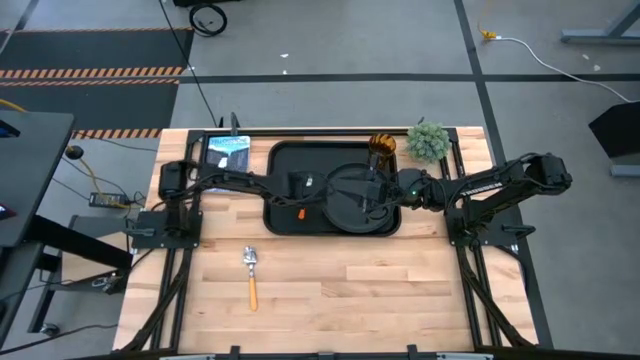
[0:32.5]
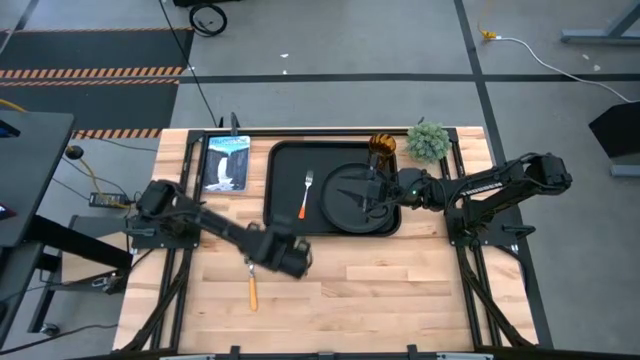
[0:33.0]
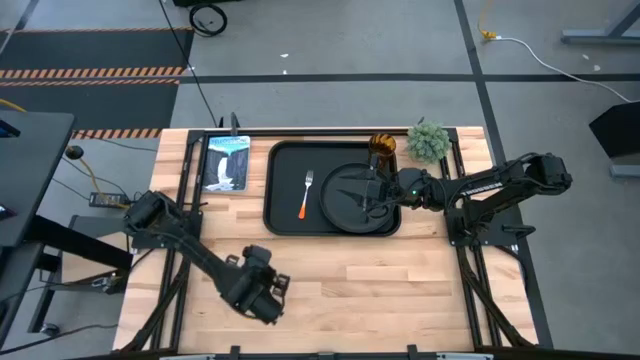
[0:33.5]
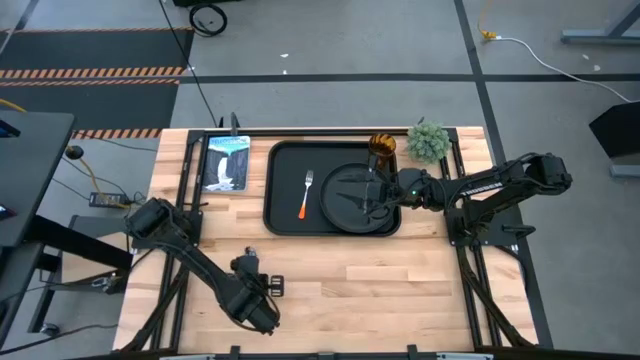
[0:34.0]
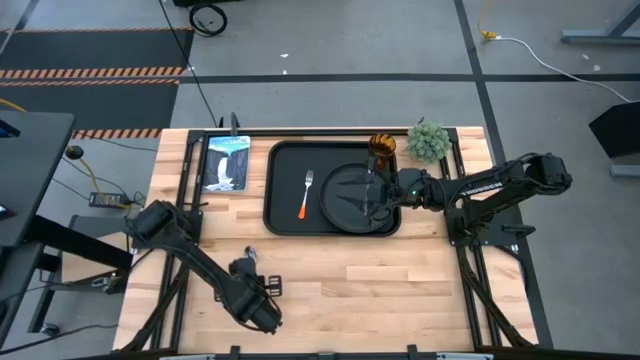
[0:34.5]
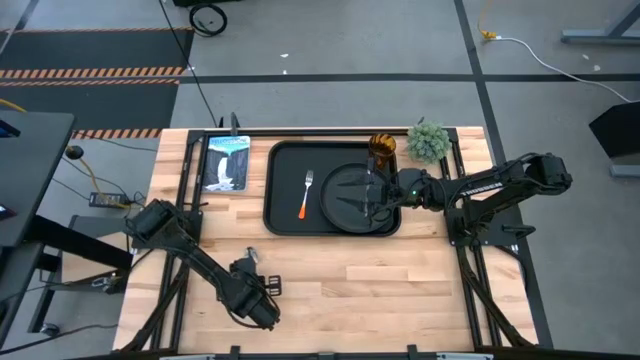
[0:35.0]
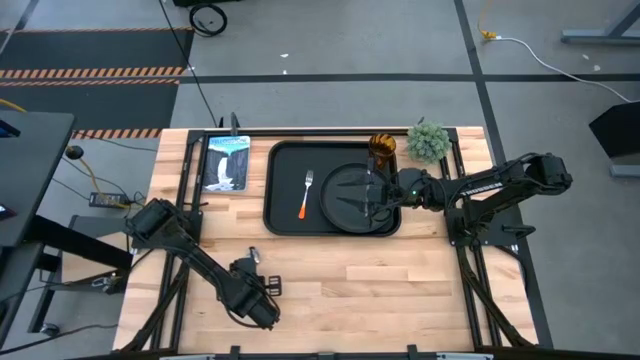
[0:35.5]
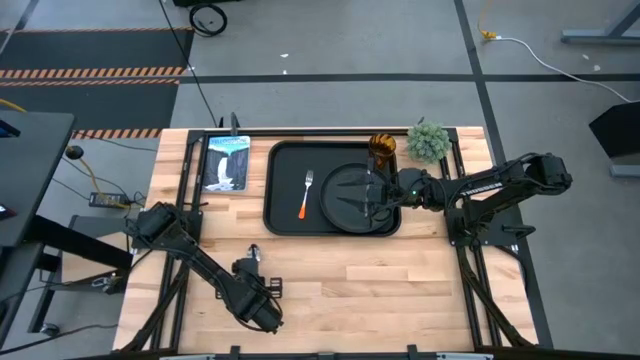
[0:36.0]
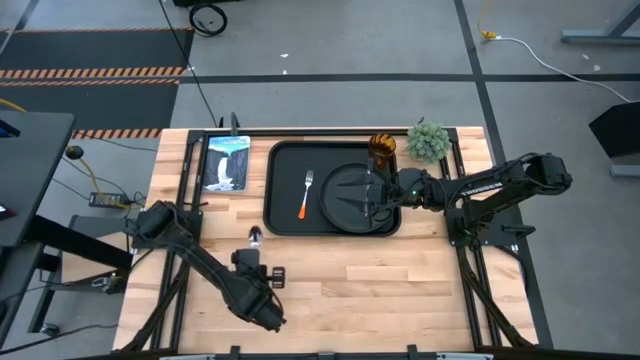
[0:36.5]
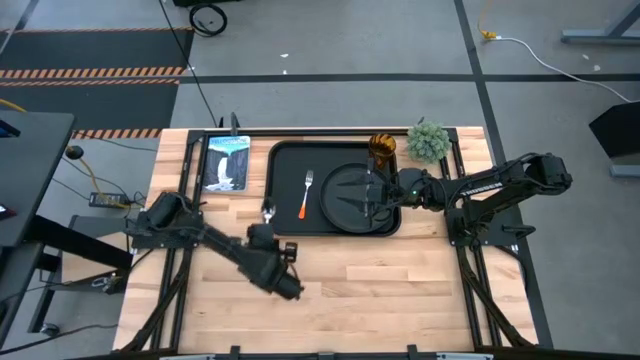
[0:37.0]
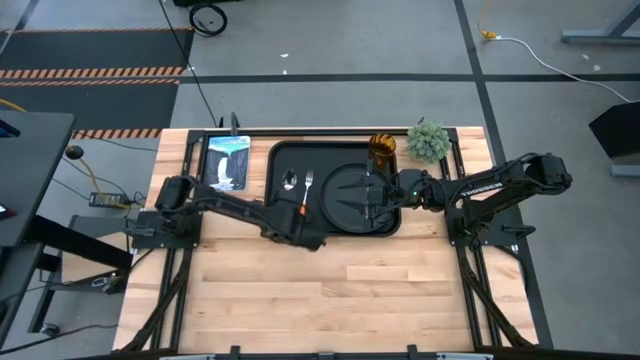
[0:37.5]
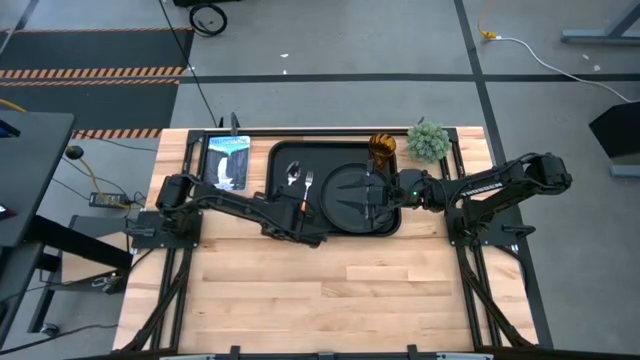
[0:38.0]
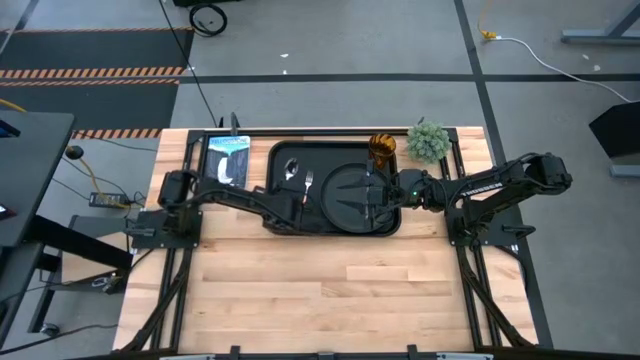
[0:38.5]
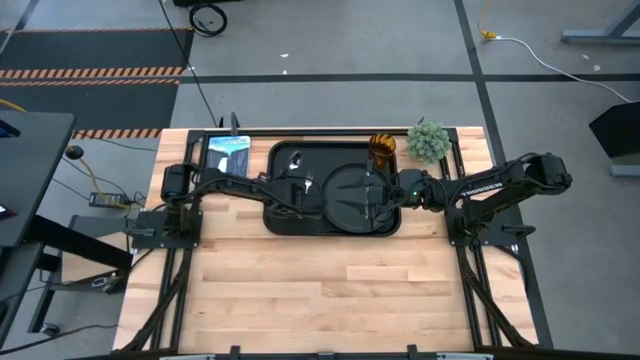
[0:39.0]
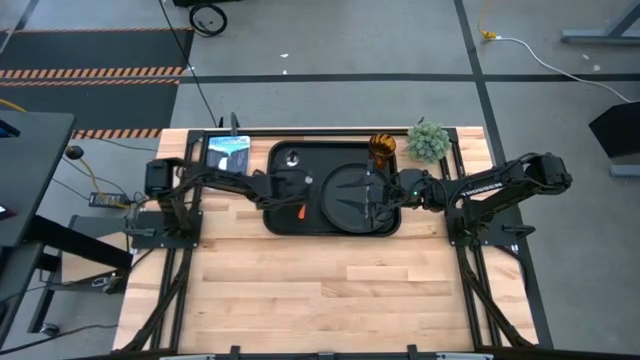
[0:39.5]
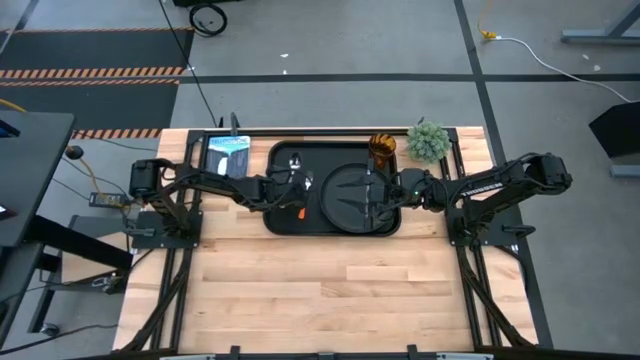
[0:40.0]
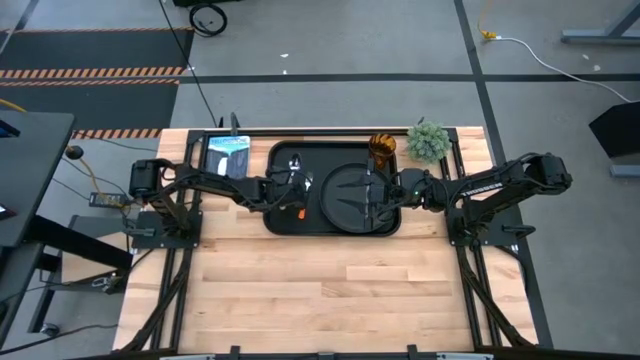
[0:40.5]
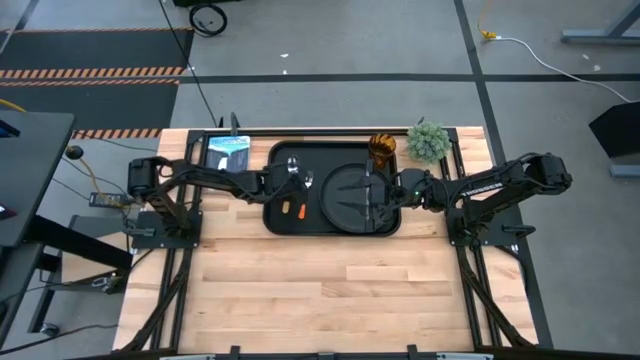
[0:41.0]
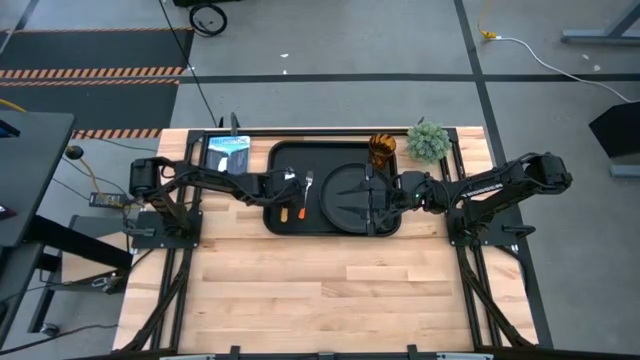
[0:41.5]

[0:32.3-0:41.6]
Task: Pick and place plate/cup/fork/spoon on tray
Put the yellow spoon on the black serving tray to the left of the orange fork

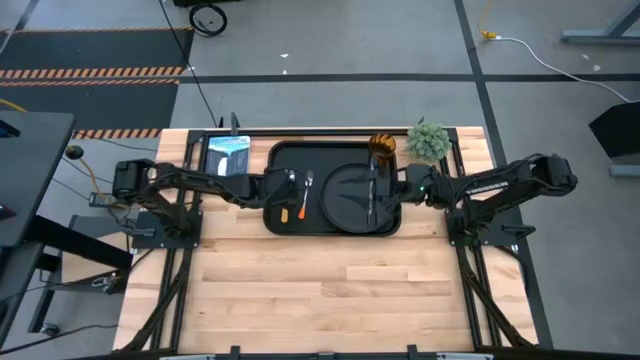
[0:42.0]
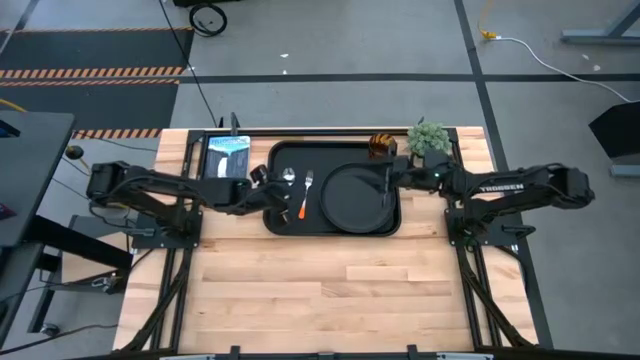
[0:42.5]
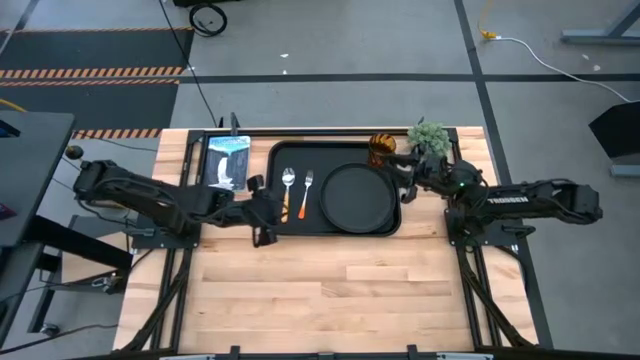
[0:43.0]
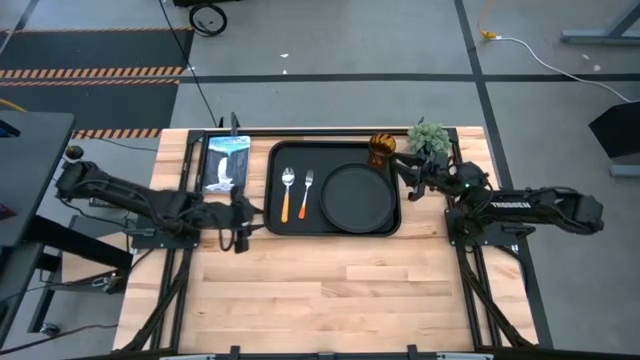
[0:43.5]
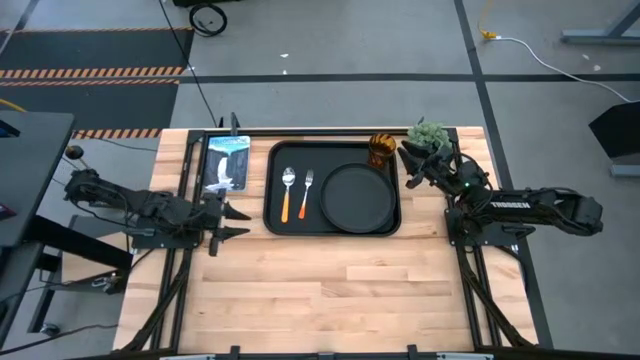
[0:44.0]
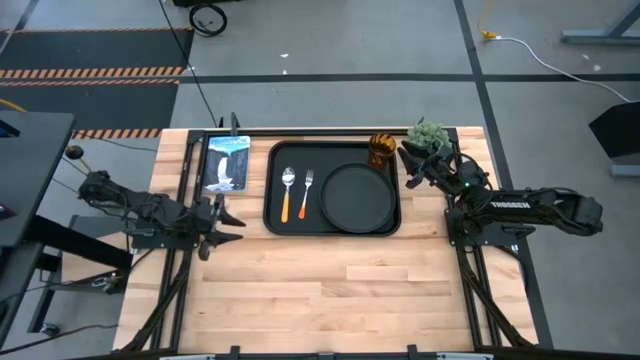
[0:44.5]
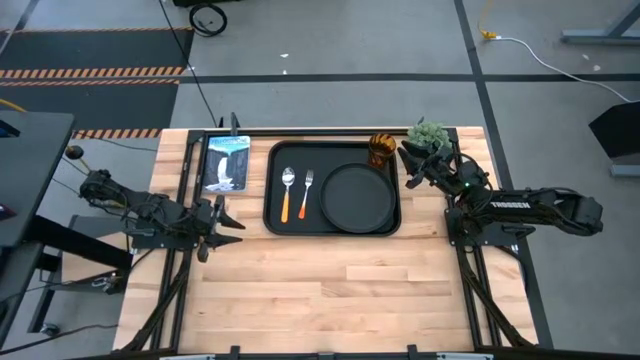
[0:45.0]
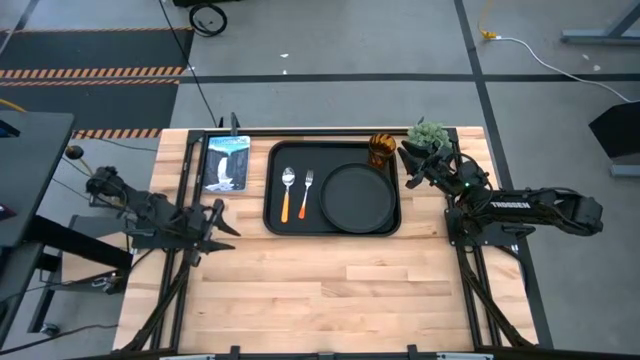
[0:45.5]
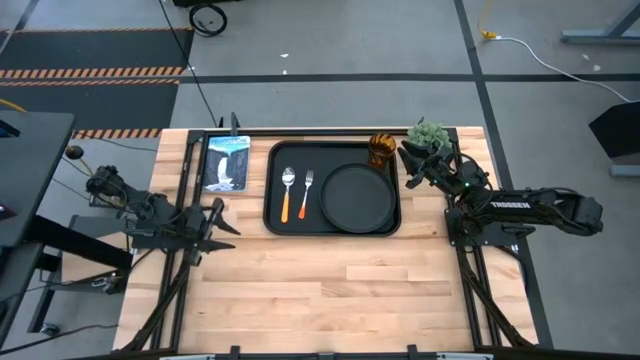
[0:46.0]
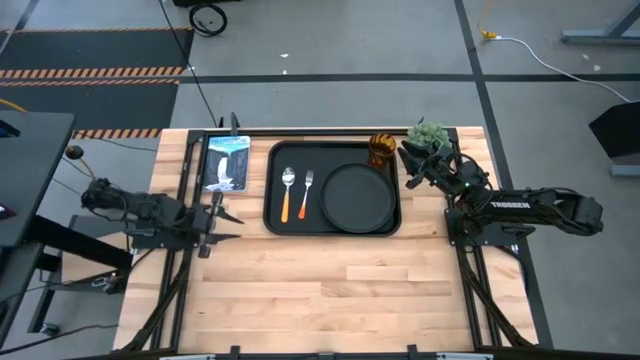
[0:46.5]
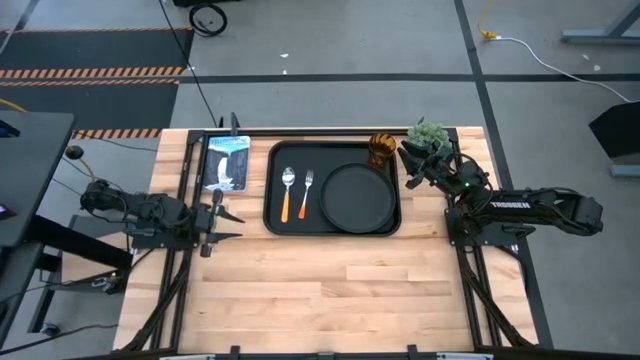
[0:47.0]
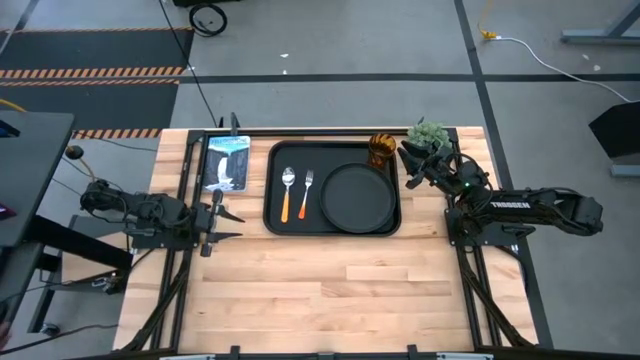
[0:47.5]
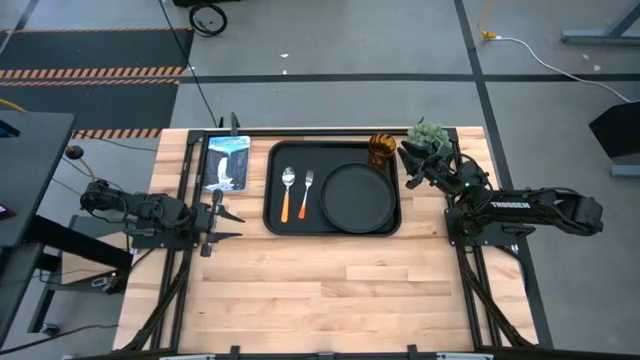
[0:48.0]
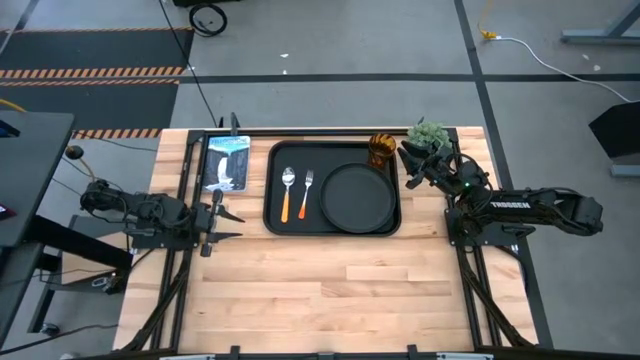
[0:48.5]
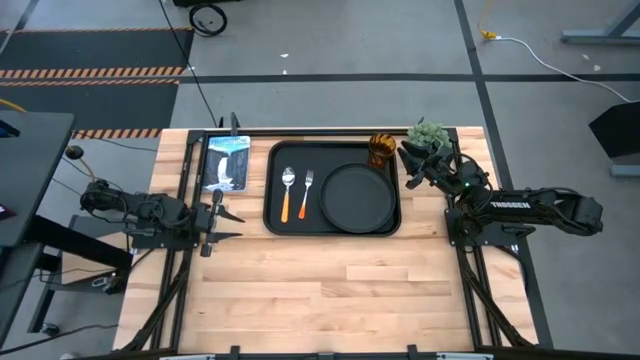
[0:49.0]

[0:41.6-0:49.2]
Return to Home Position

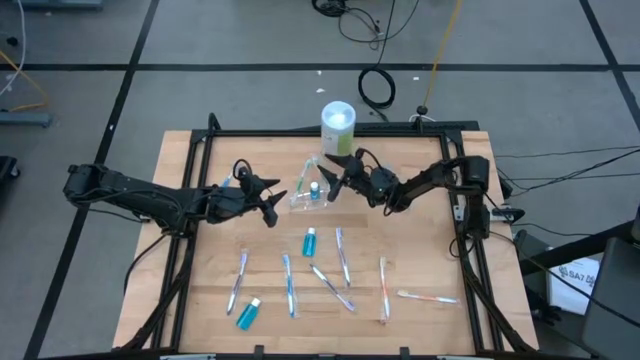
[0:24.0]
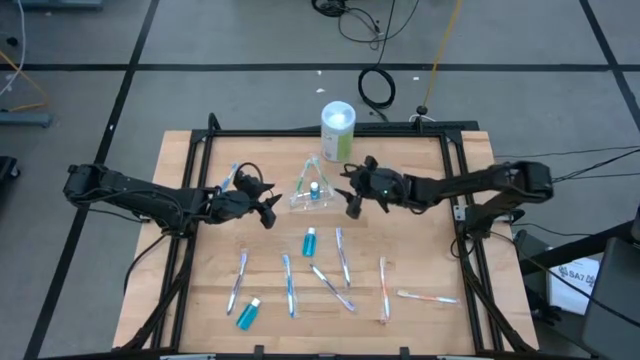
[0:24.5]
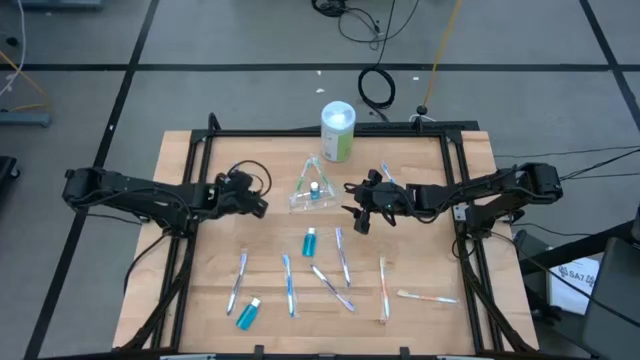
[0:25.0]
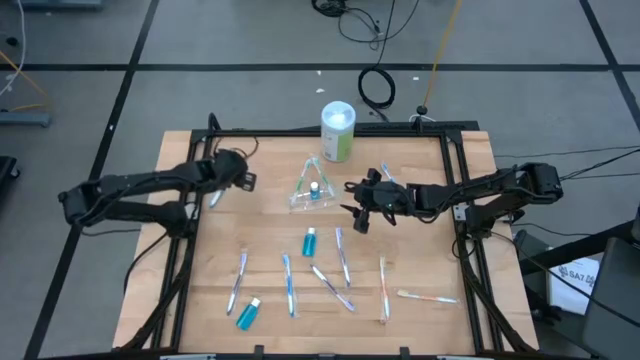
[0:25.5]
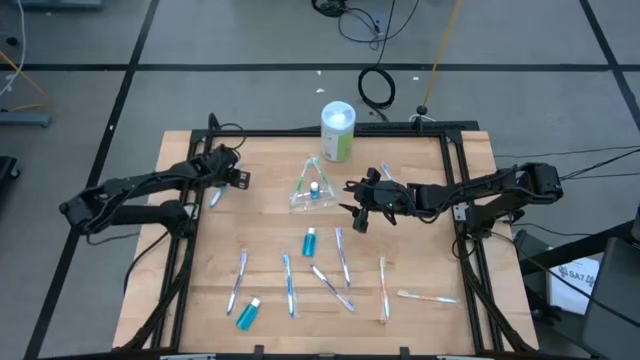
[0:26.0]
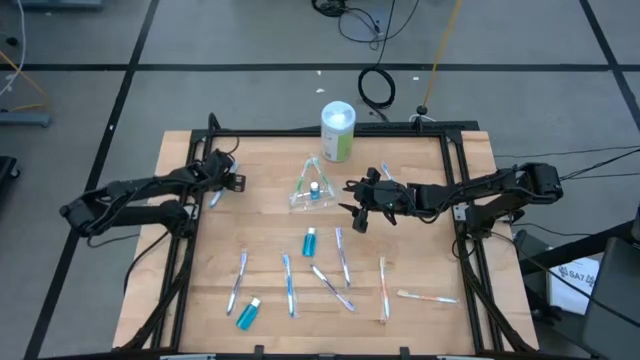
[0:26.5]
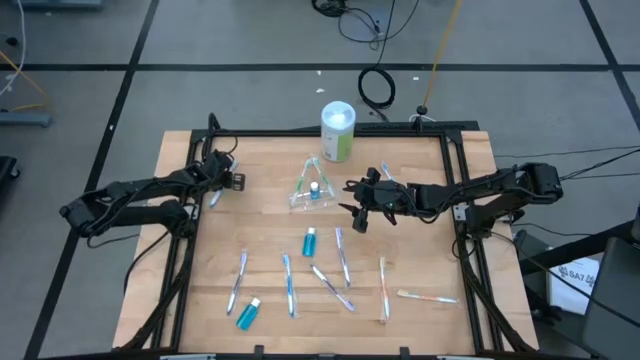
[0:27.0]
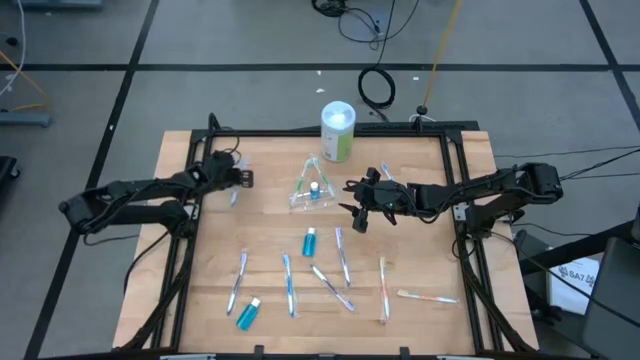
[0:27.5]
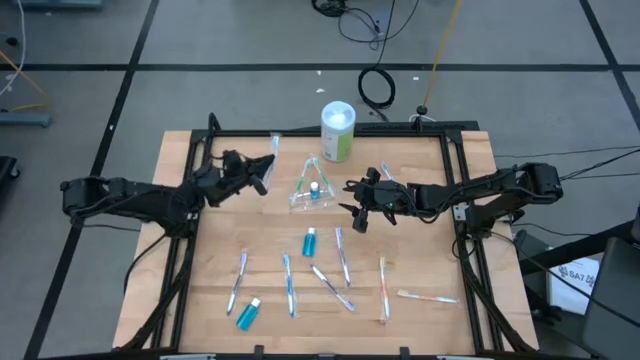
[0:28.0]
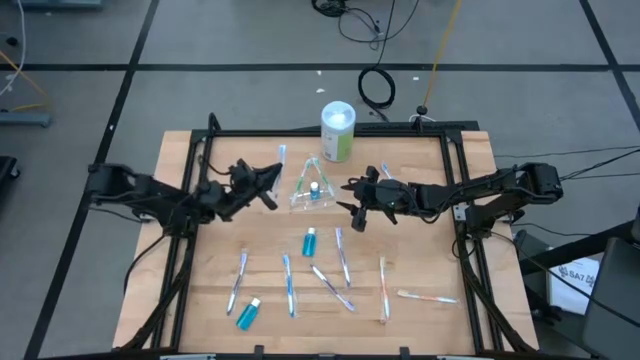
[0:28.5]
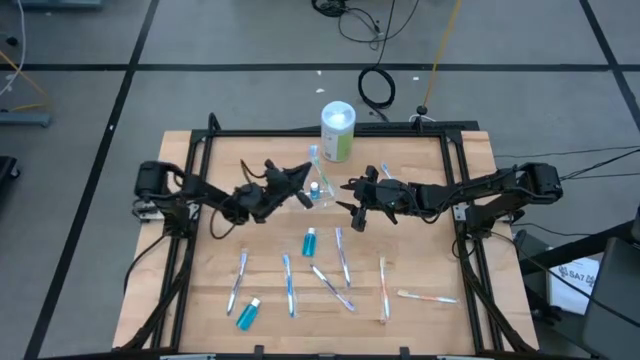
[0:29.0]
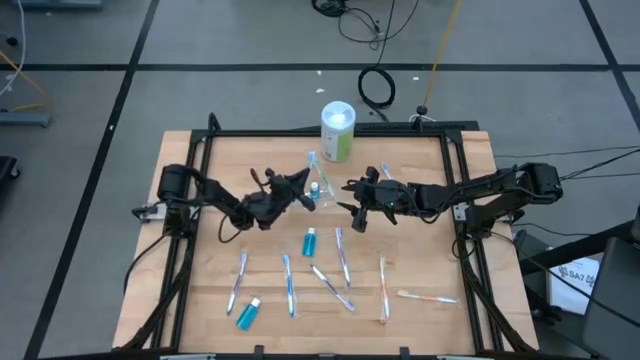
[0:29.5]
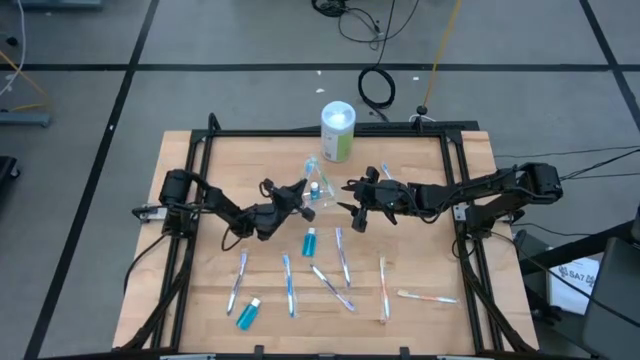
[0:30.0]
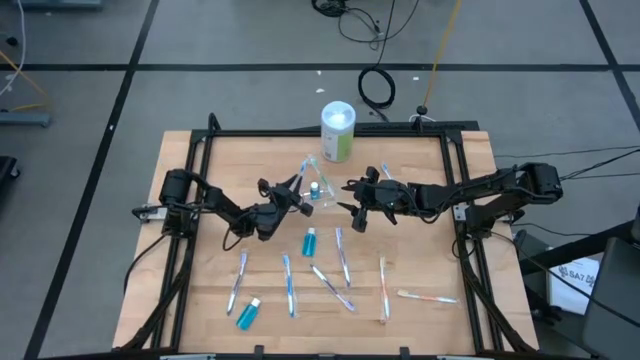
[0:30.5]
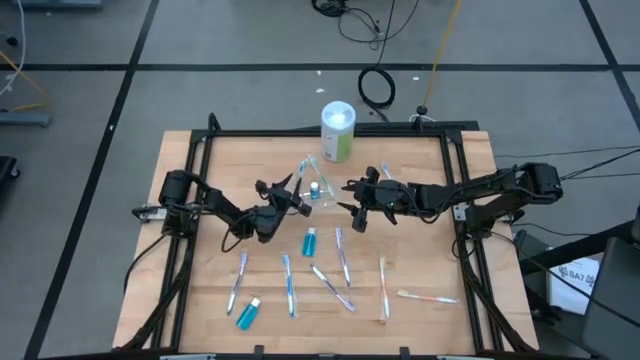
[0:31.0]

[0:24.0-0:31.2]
Task: Pick & Place toothbrushing station
Put the top left blue toothbrush into the transparent organizer
